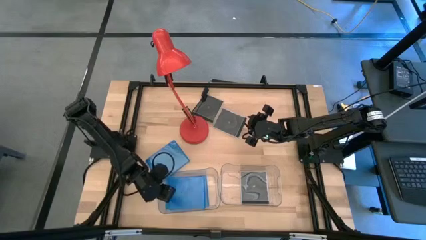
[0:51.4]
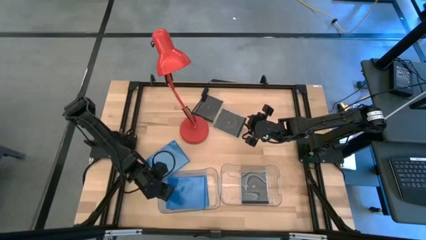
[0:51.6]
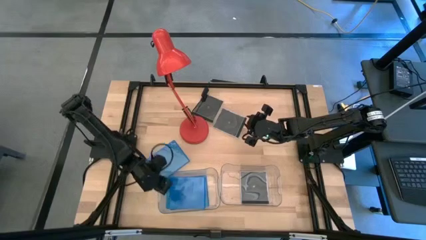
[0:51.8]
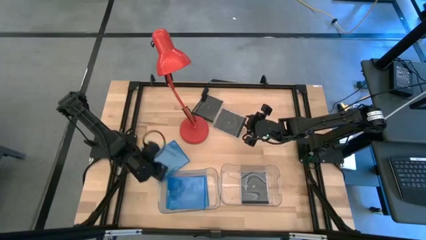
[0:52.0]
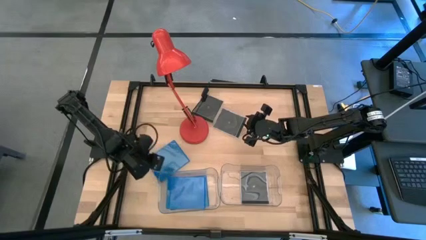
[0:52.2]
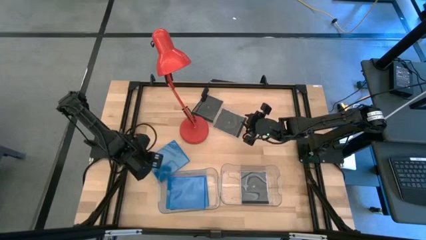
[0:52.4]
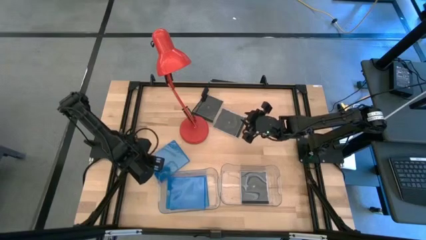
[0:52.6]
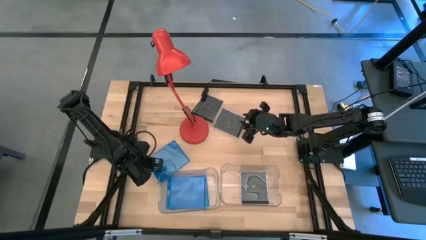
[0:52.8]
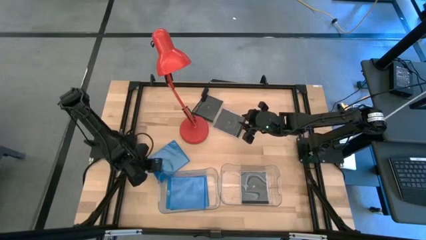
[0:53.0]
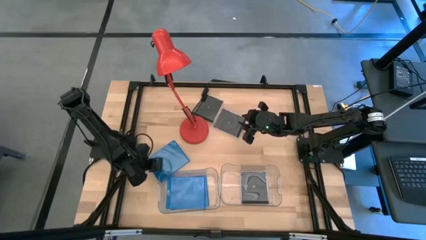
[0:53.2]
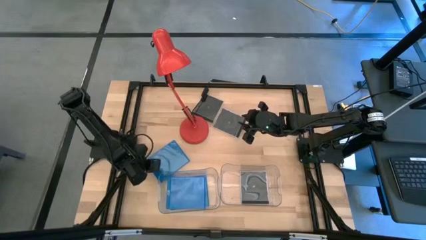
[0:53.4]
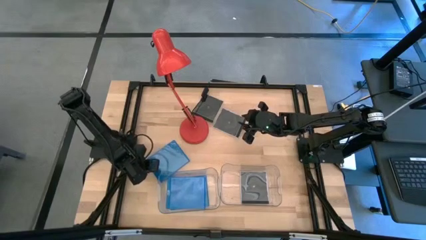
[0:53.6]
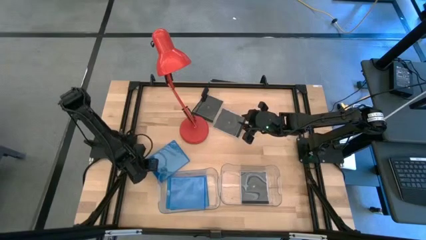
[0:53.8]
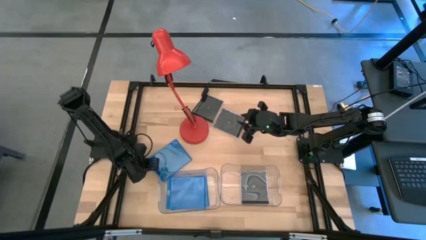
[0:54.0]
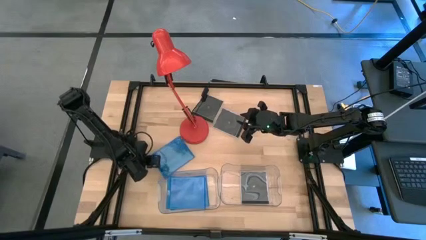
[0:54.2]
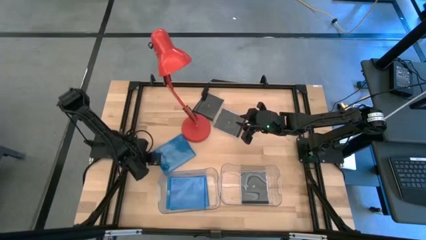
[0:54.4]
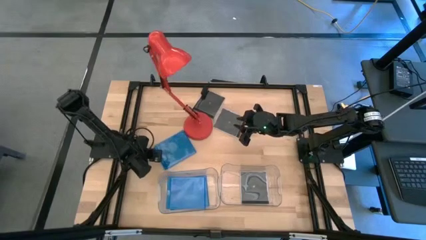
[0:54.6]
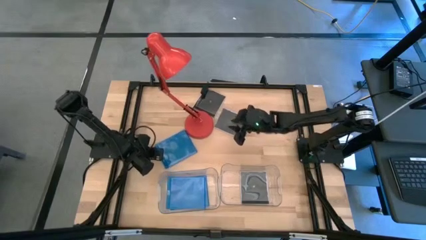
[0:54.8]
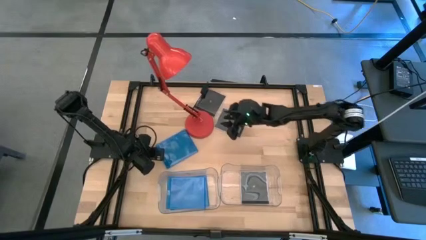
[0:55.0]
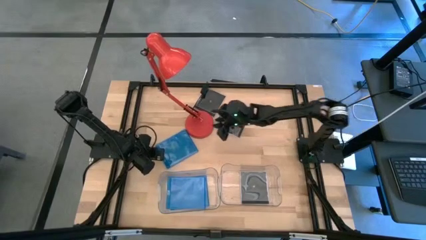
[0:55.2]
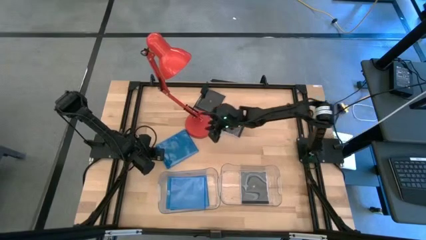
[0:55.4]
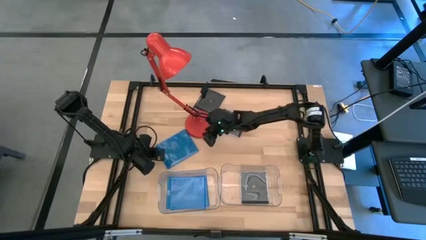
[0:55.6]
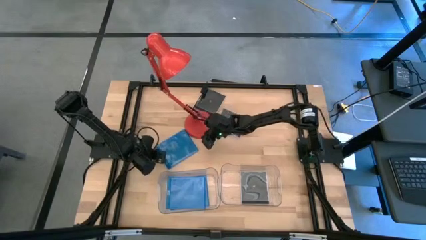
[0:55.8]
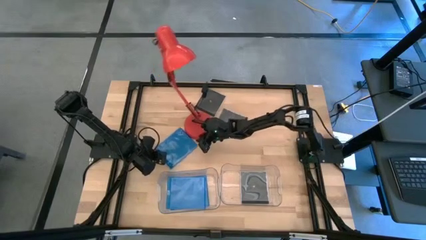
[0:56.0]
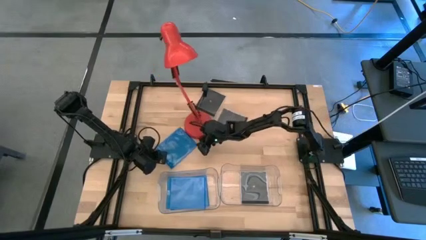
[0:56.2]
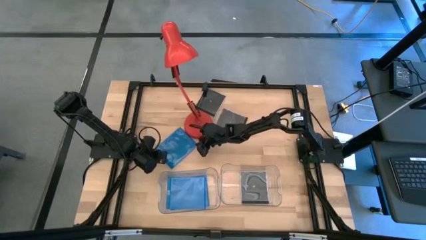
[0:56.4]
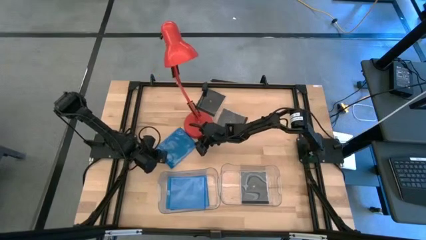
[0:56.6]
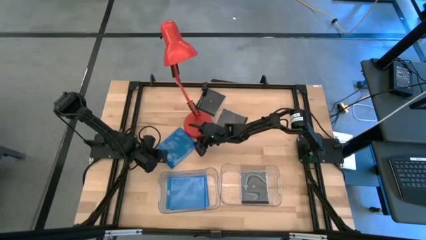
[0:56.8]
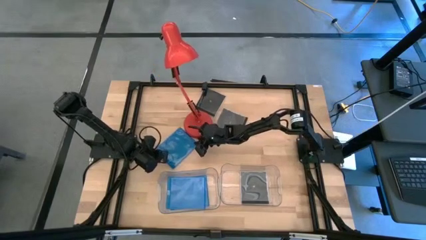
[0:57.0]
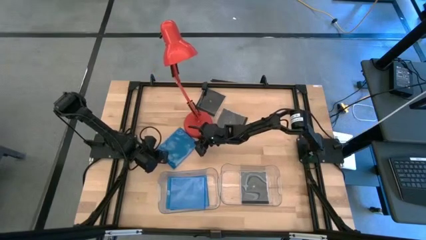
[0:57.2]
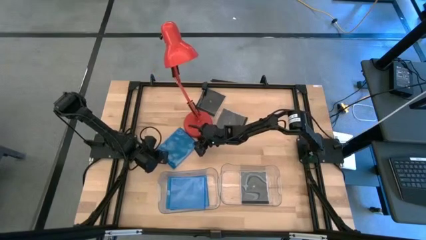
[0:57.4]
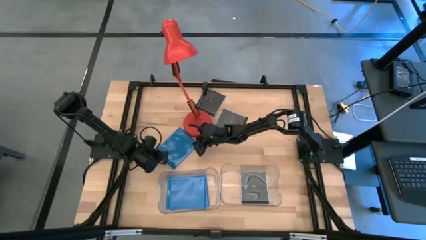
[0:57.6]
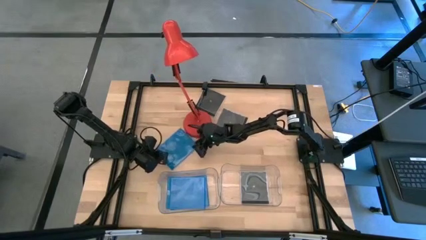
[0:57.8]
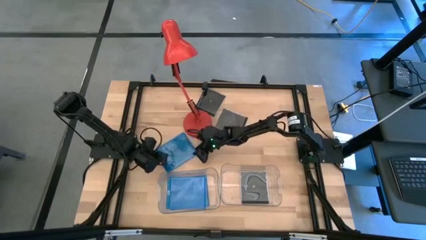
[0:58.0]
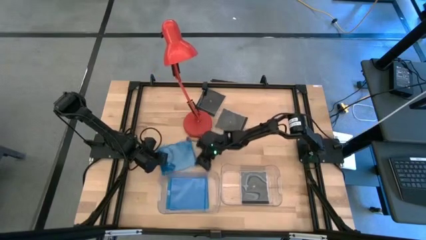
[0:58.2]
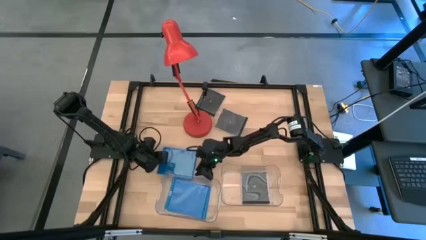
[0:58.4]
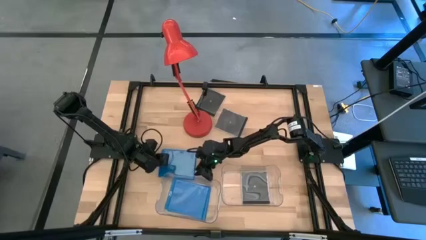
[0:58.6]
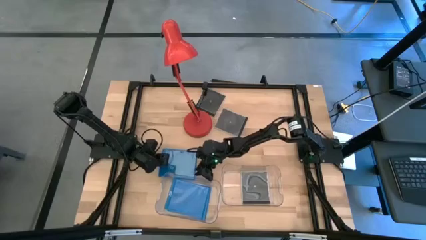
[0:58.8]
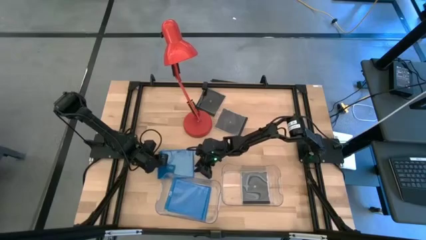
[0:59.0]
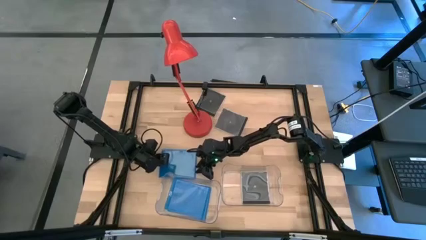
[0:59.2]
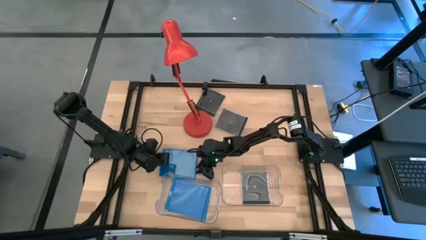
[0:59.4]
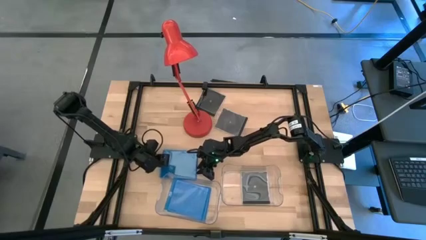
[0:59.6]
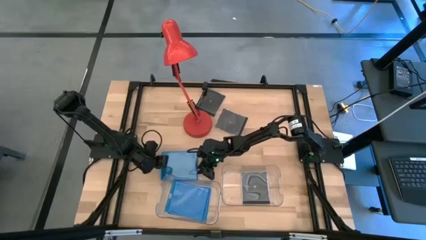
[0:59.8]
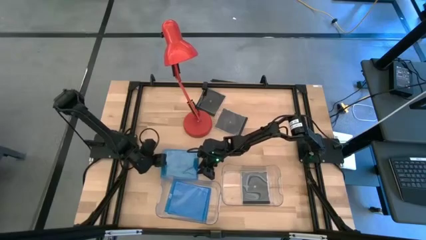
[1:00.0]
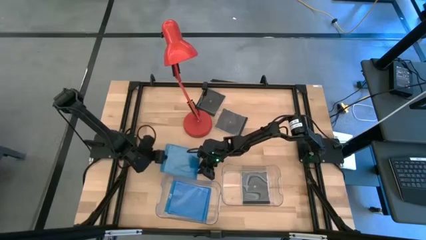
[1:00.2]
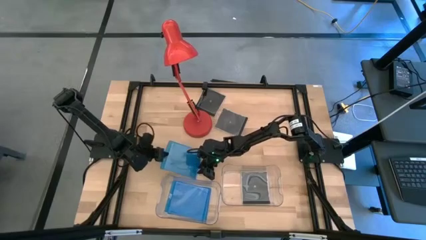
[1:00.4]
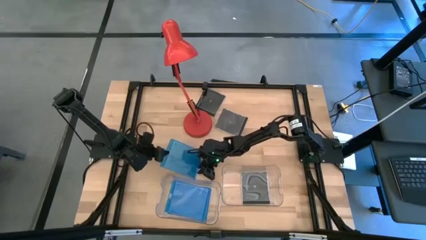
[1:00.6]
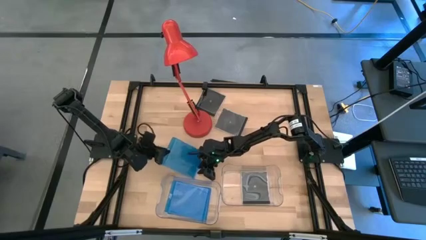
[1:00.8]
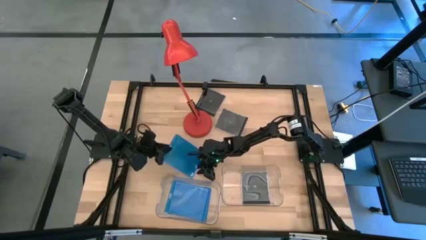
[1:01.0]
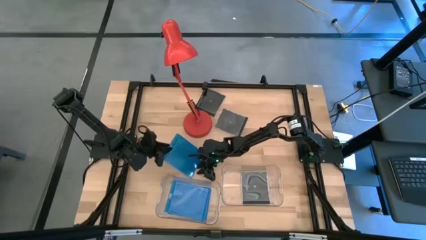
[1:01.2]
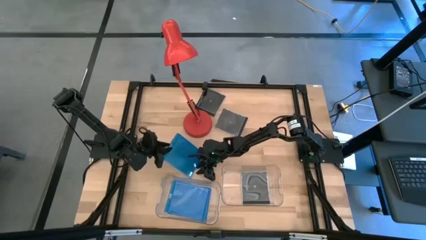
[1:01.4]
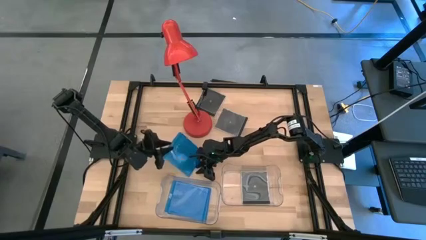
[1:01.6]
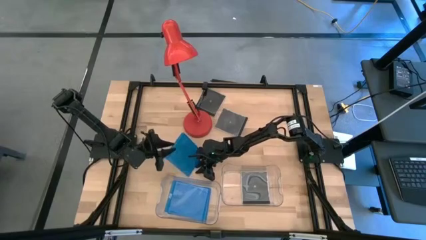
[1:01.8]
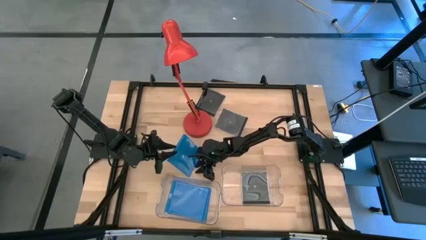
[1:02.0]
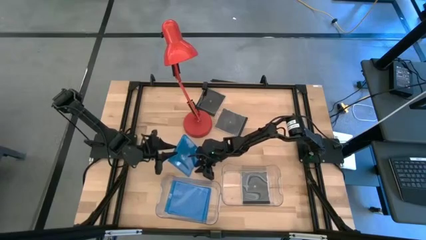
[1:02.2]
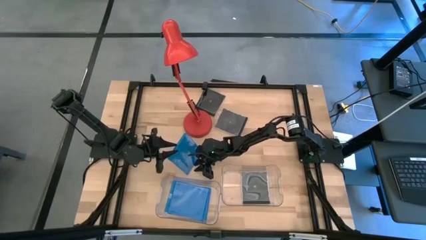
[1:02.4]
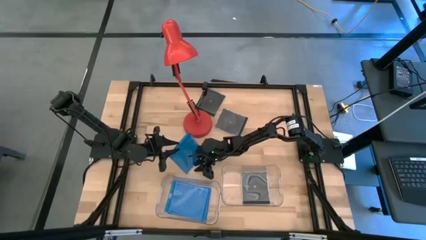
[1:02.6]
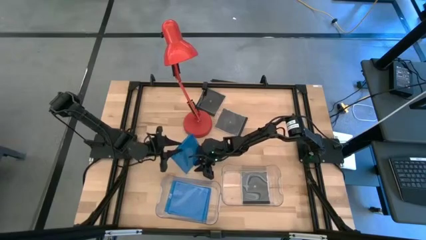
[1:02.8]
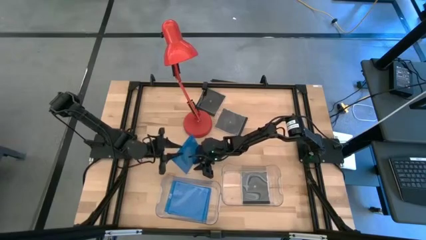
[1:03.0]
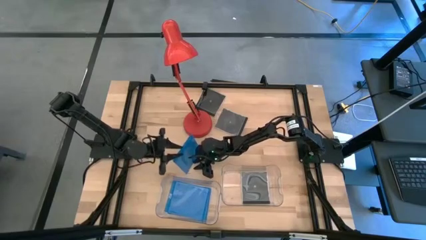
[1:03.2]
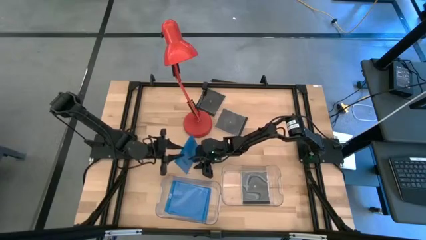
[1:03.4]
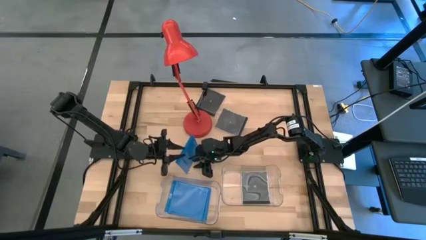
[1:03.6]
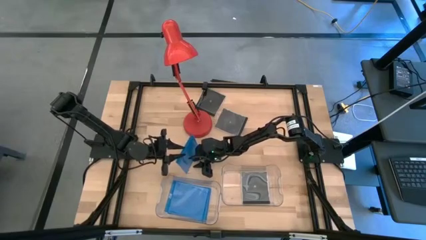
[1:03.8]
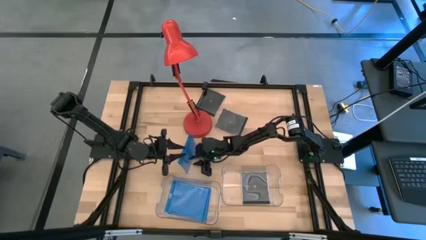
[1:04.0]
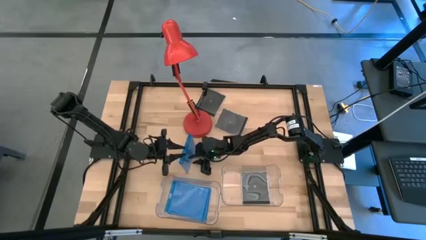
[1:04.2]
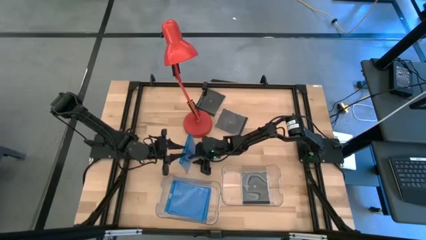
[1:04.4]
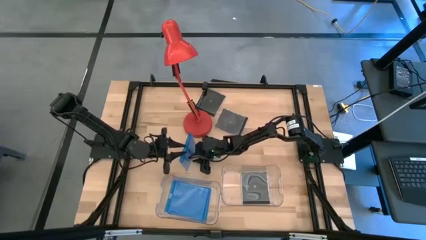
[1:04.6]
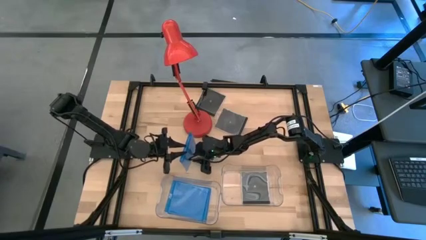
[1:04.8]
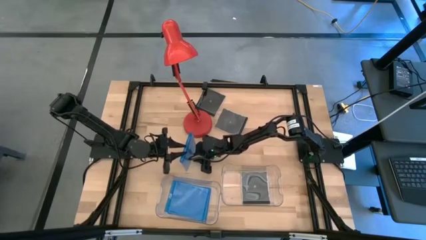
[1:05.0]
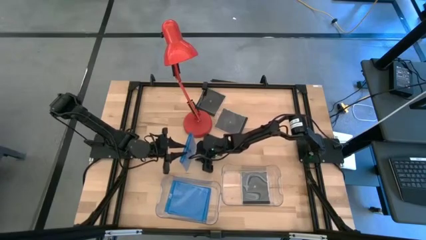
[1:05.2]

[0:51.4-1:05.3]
Task: Pick & place jewel cases by type
Put the blue cd case into the left transparent bin
